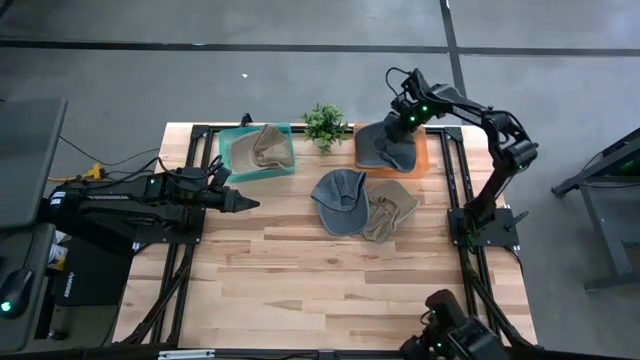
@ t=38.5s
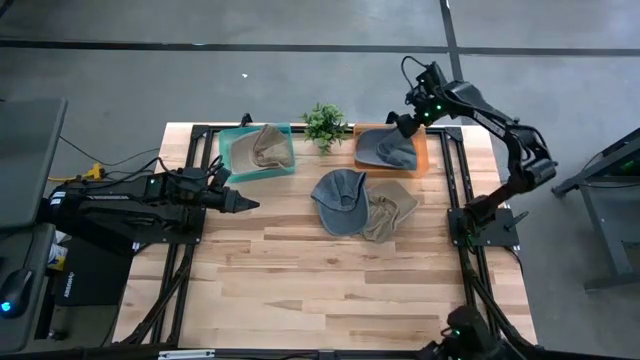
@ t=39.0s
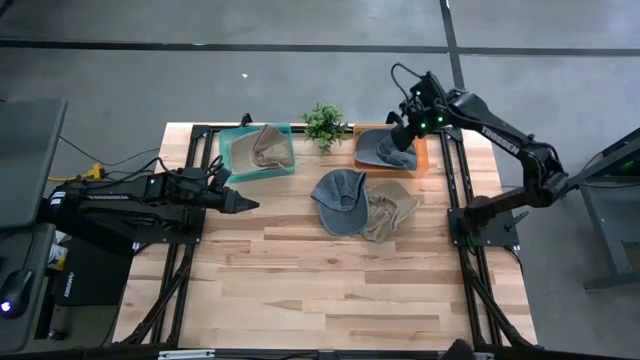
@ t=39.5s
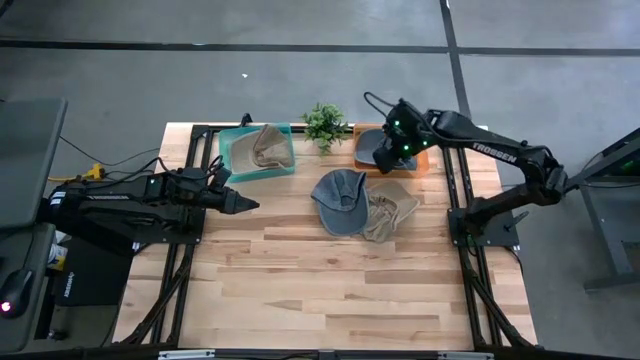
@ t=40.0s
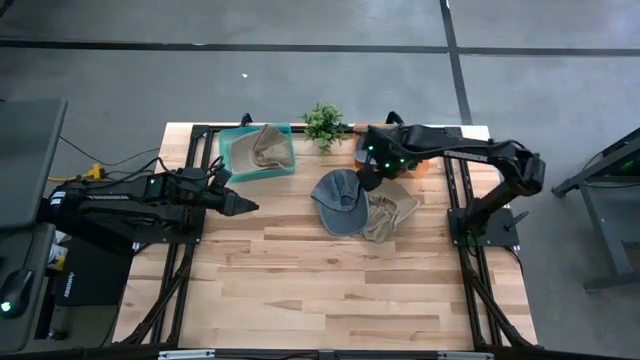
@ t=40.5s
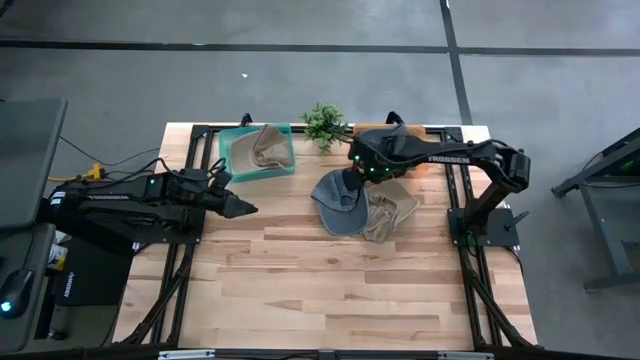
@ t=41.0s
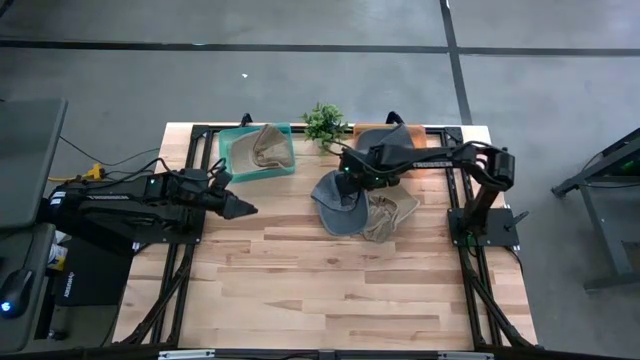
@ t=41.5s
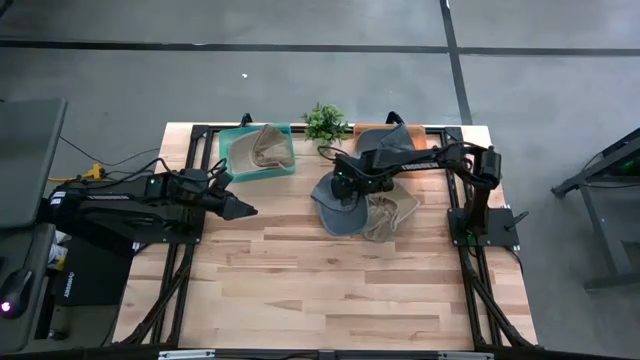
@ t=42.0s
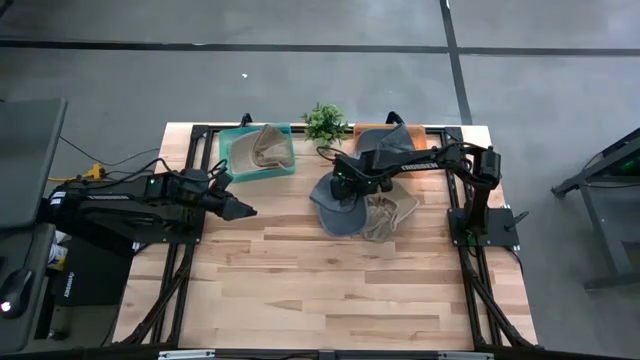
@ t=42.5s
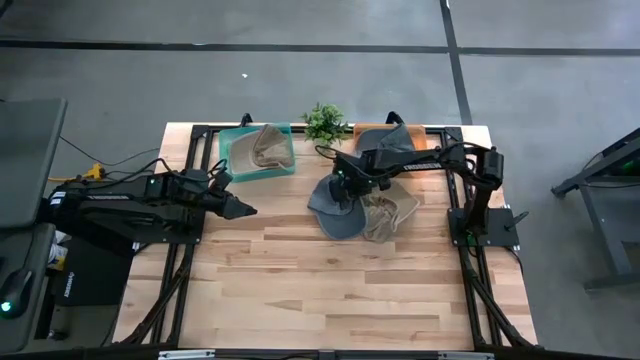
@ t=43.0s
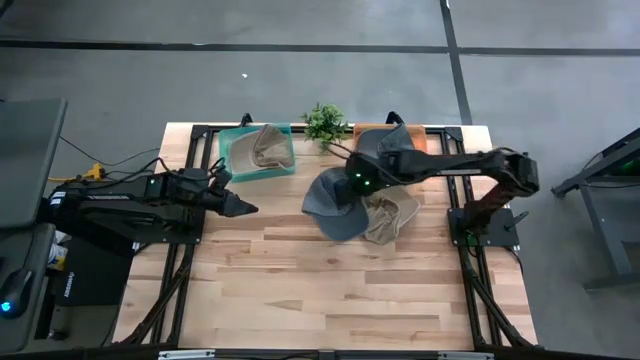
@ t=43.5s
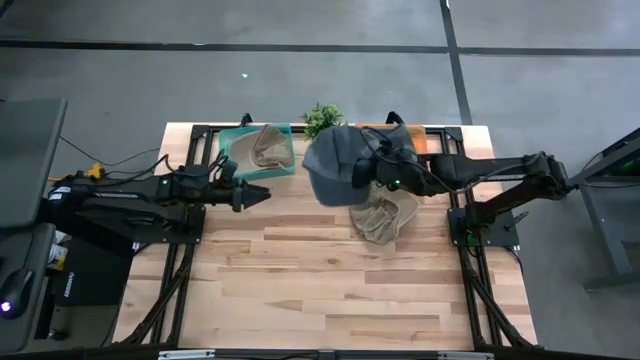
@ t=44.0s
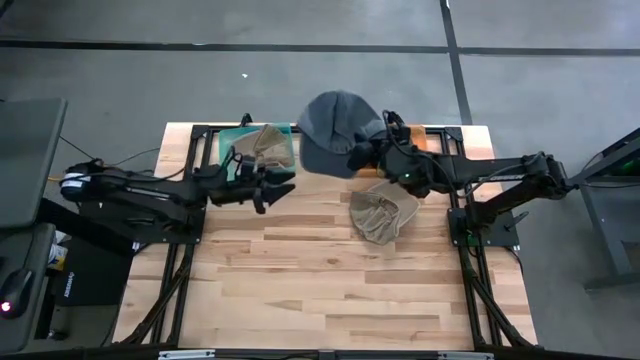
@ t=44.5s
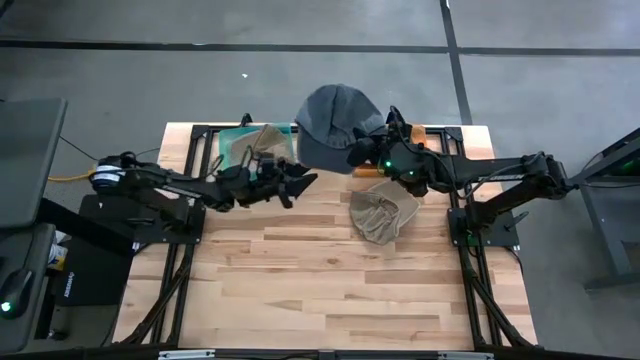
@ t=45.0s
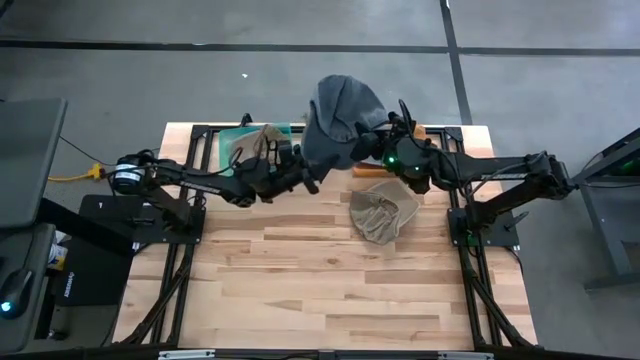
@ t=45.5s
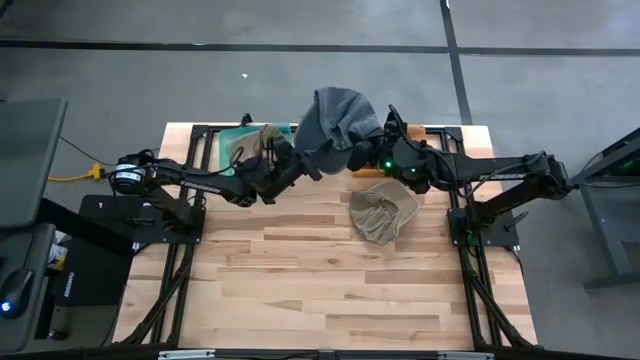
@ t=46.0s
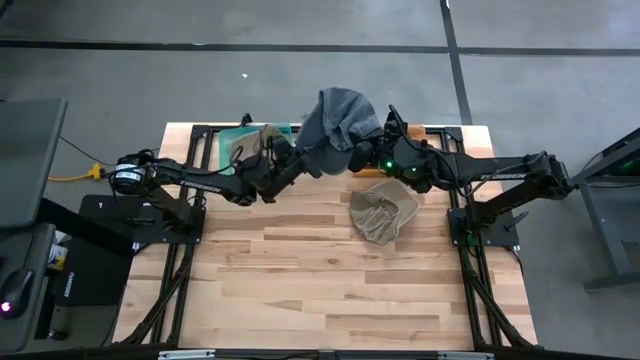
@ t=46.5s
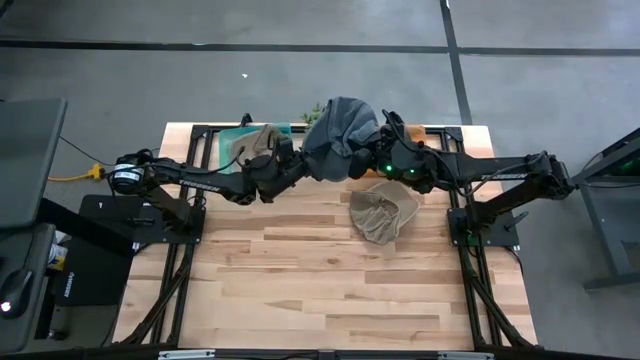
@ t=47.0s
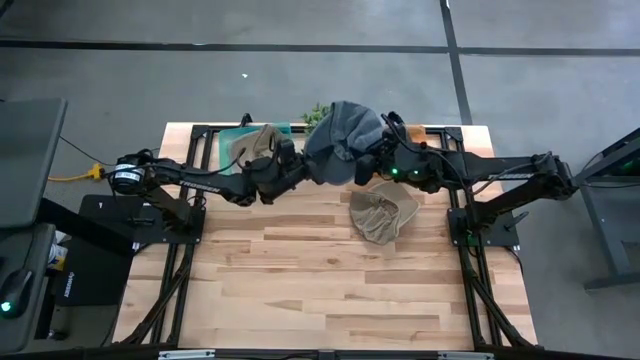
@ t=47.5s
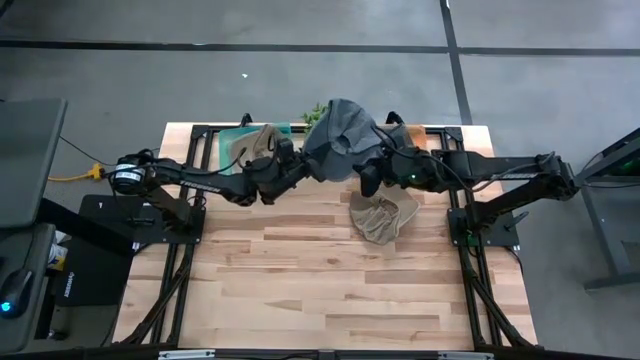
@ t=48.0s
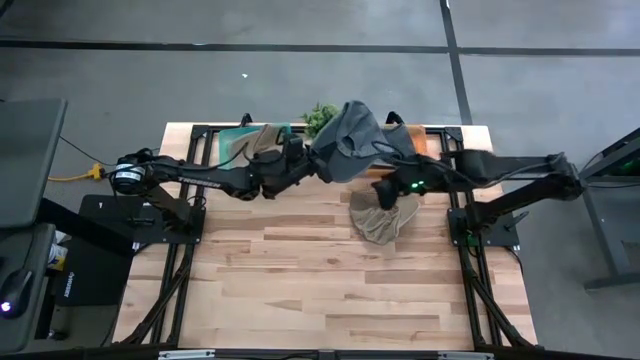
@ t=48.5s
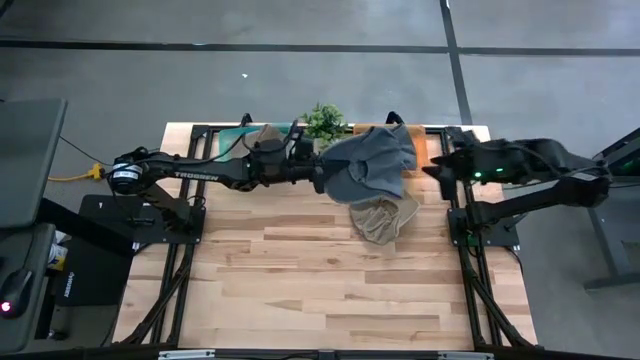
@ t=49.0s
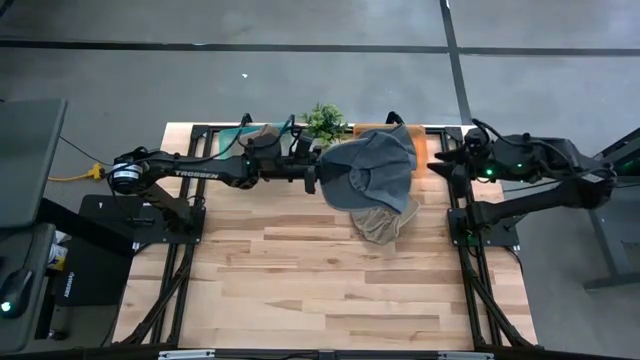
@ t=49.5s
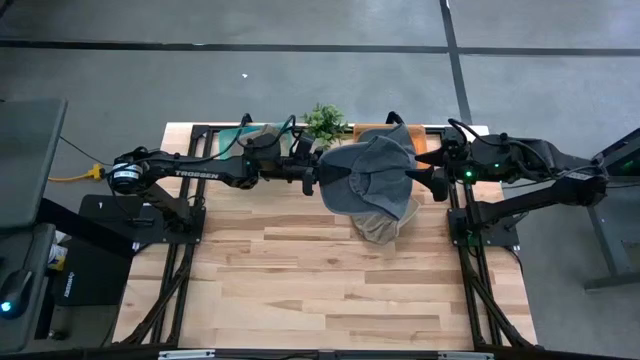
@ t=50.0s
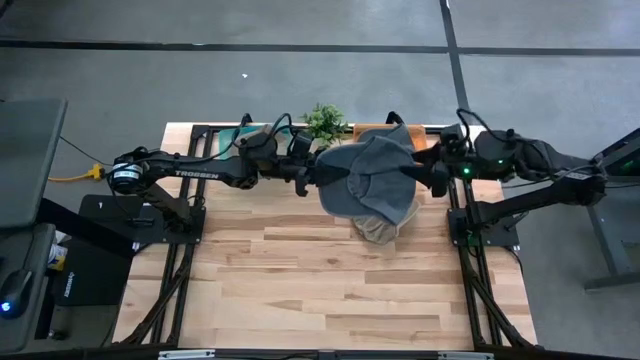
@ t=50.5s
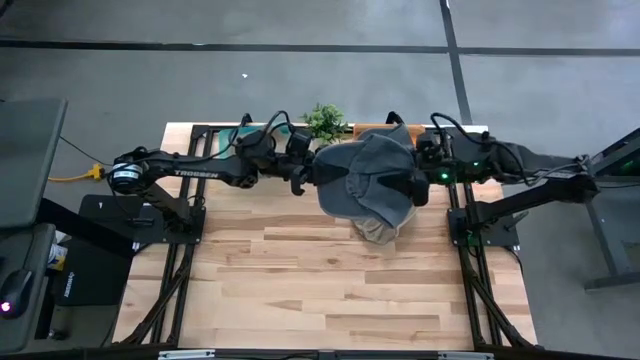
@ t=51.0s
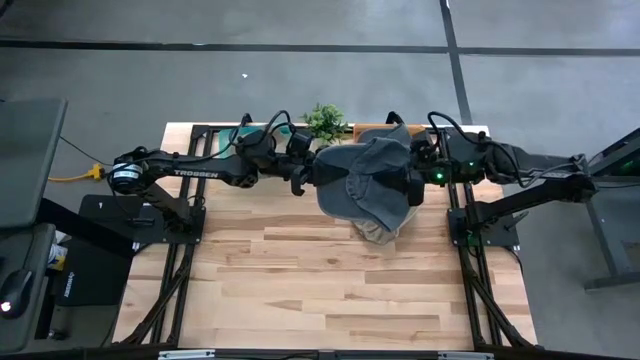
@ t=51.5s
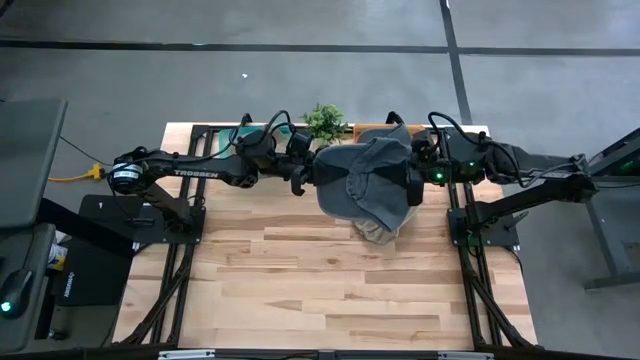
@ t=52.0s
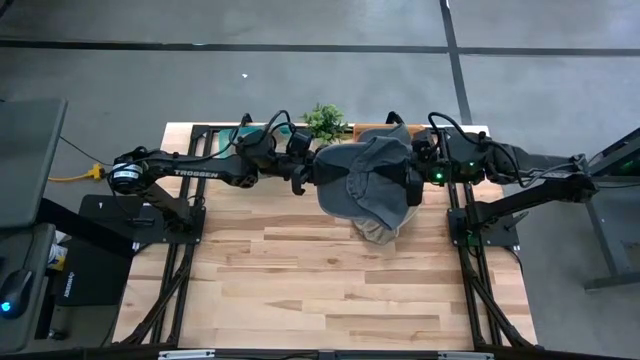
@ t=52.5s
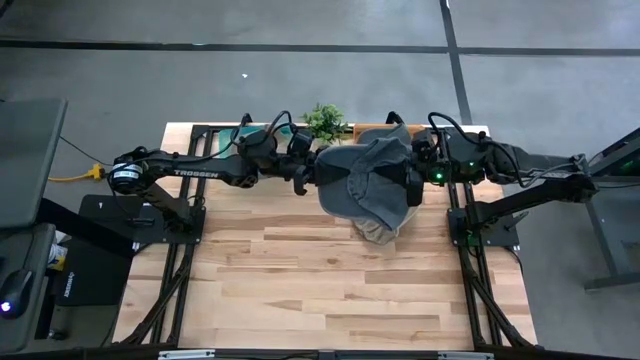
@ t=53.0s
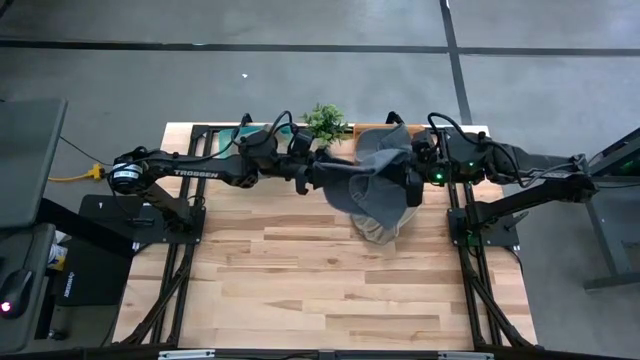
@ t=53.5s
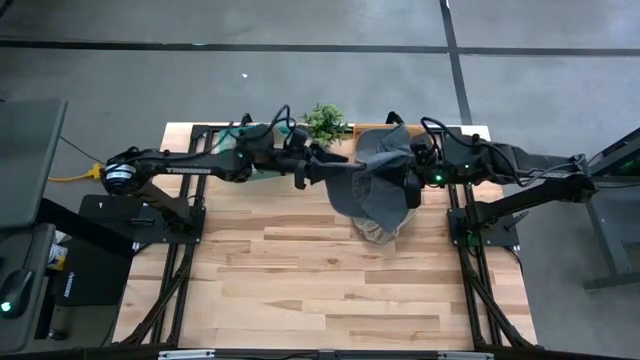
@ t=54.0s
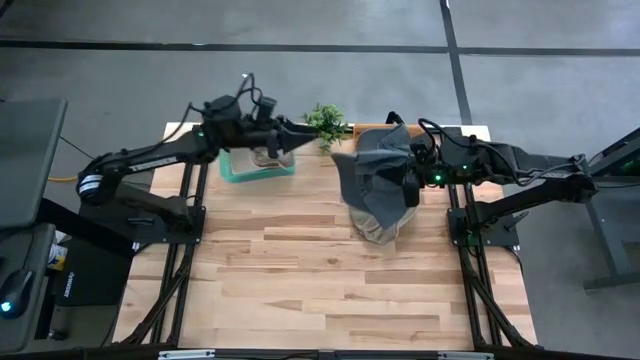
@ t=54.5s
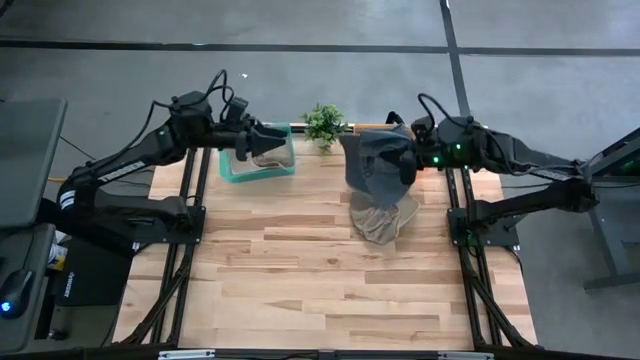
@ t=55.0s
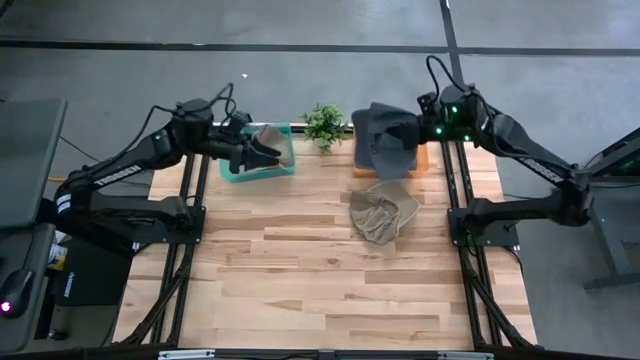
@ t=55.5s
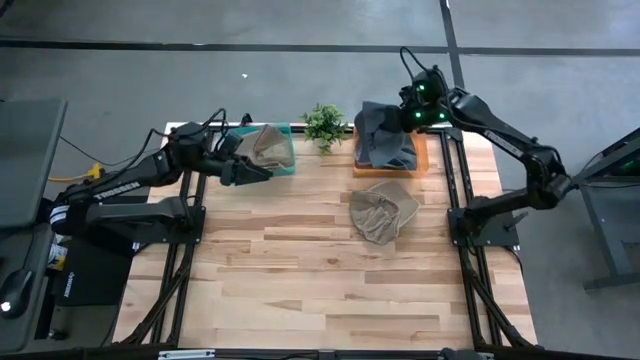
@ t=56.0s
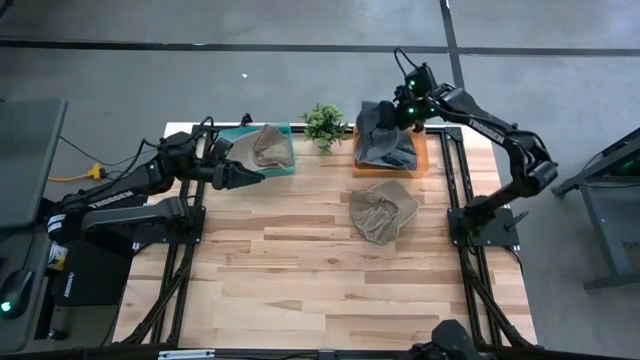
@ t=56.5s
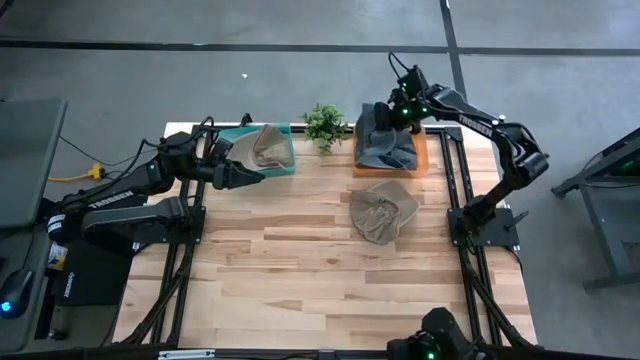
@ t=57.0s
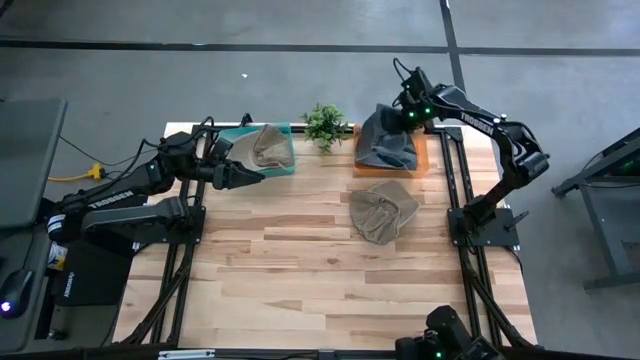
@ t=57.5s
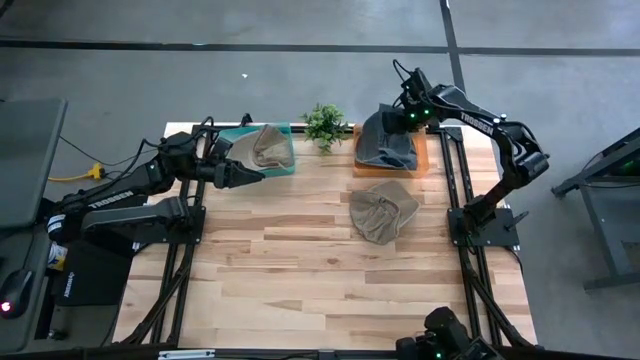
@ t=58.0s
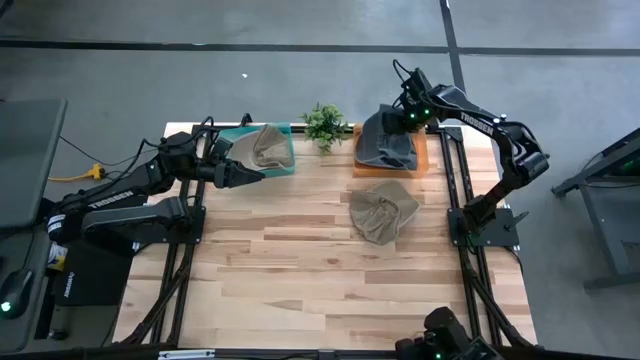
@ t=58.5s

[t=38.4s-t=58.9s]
Task: Pick & Place hat
Put the blue cap into the orange bin

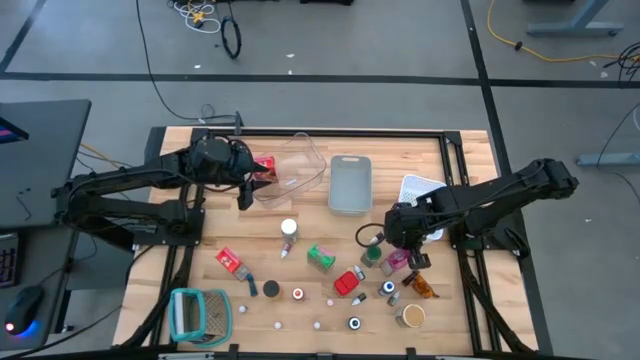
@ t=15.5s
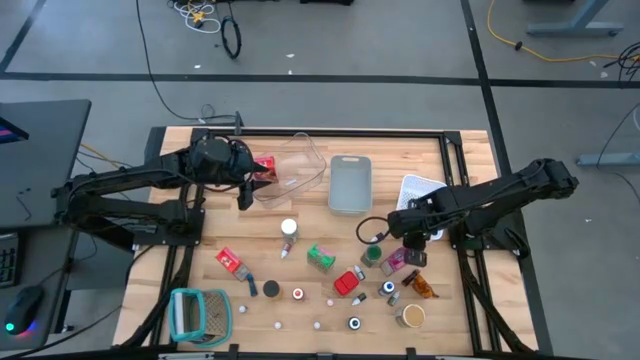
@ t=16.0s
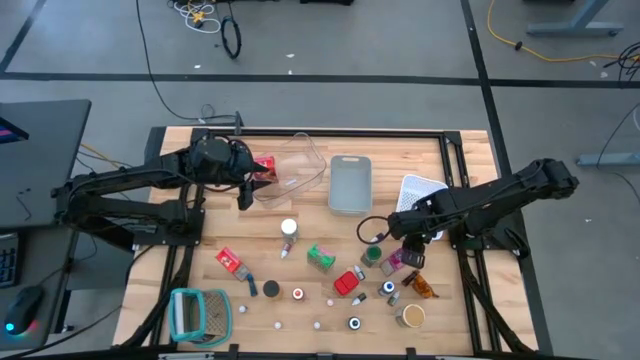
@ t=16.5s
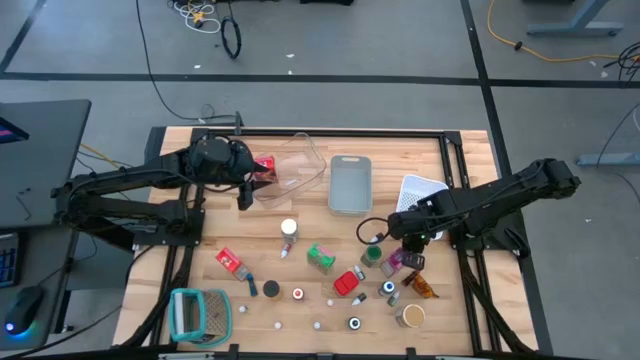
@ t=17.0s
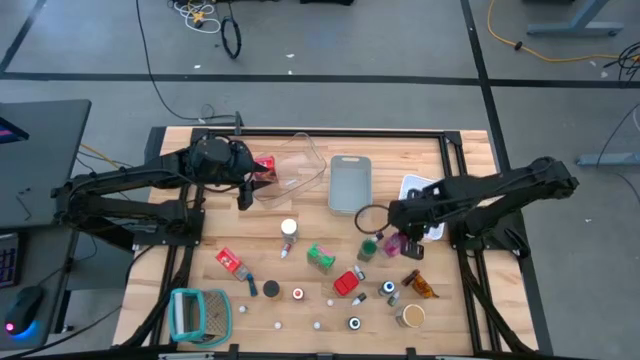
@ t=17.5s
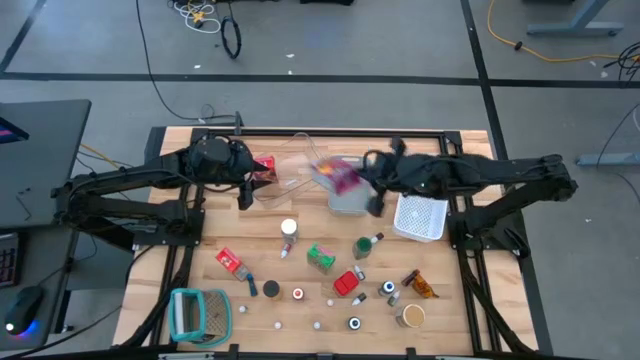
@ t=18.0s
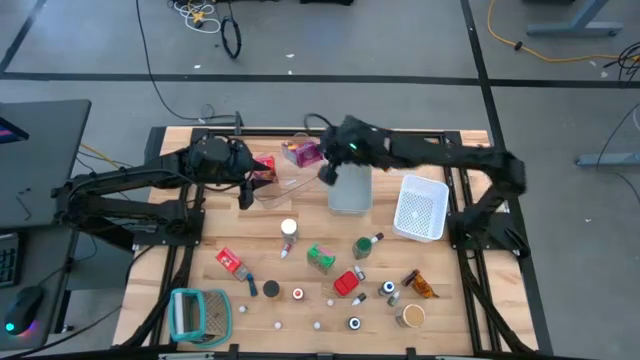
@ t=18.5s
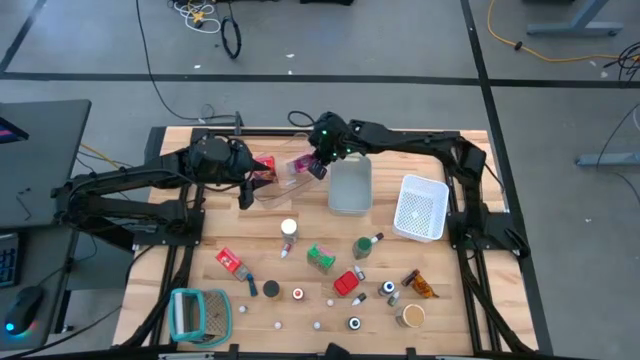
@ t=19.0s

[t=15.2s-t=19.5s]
Task: Pick & Place Kitchen Items
Put the purple cereal box into the transparent bin
